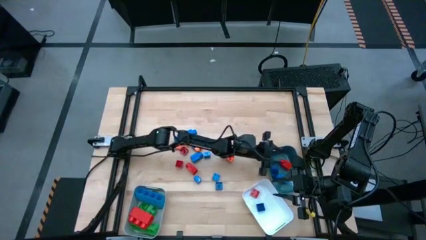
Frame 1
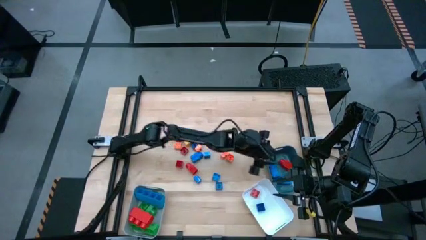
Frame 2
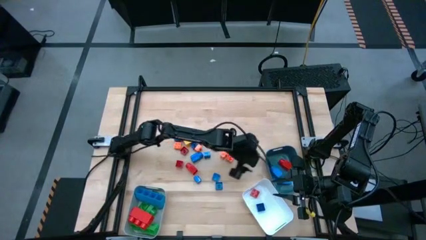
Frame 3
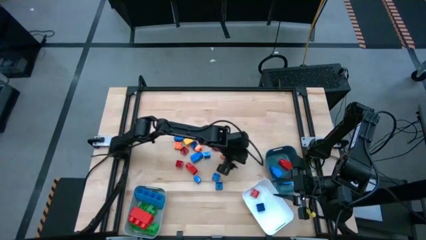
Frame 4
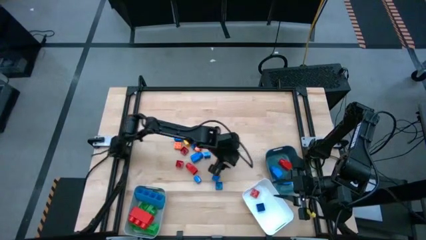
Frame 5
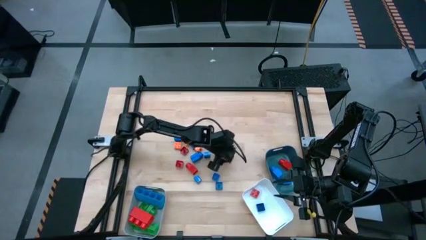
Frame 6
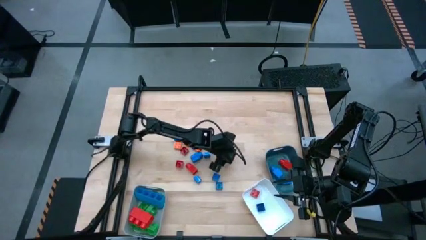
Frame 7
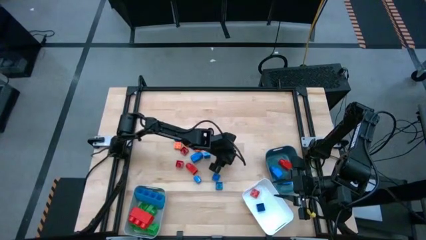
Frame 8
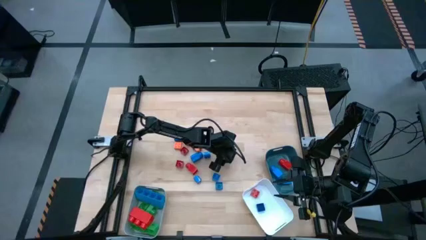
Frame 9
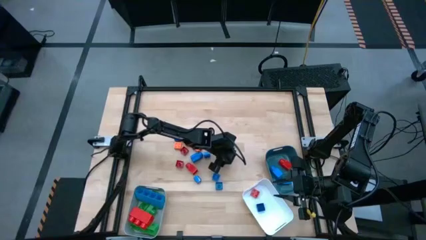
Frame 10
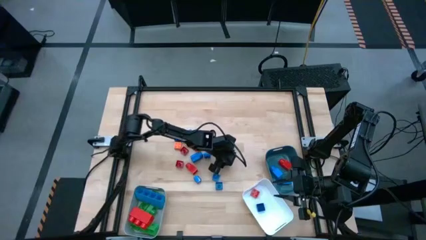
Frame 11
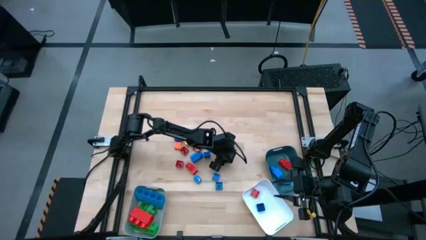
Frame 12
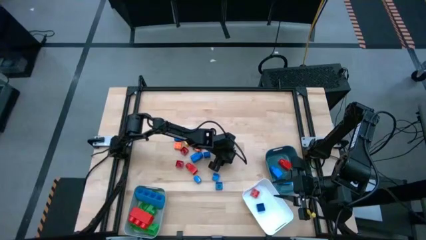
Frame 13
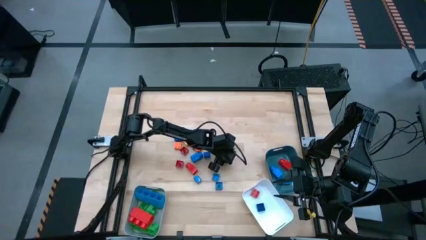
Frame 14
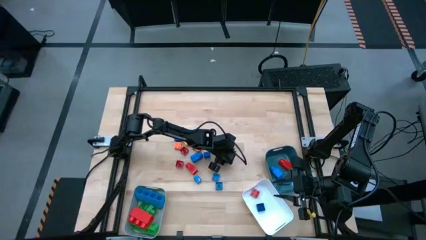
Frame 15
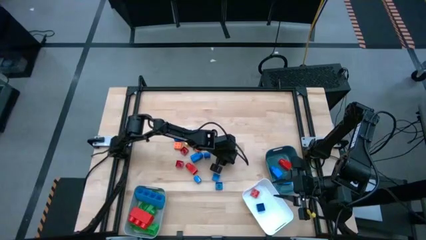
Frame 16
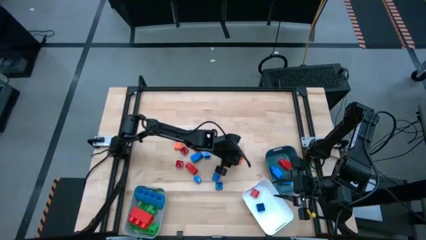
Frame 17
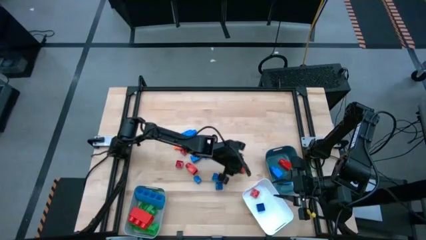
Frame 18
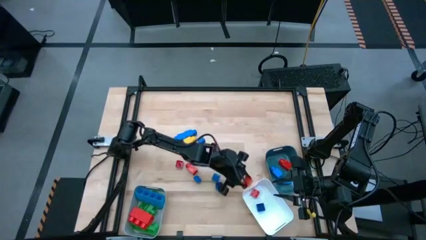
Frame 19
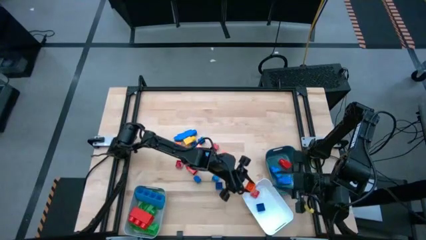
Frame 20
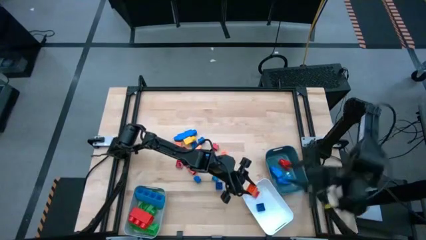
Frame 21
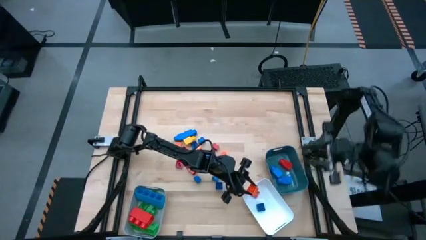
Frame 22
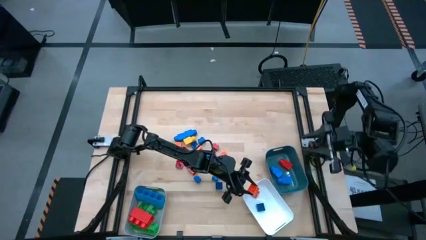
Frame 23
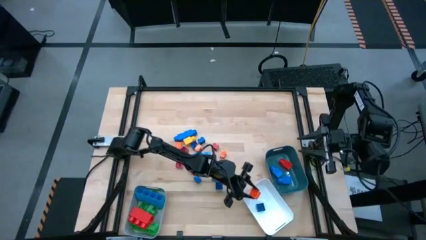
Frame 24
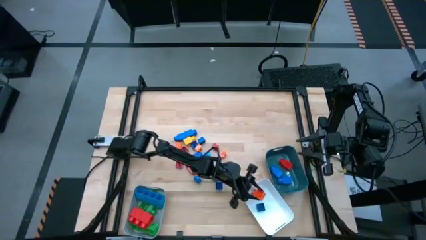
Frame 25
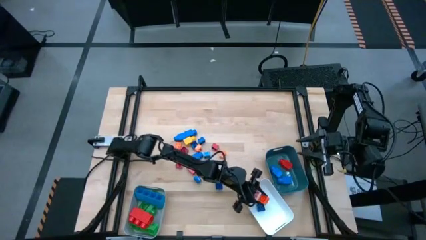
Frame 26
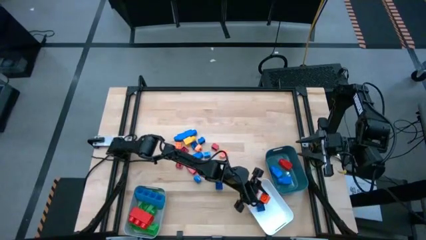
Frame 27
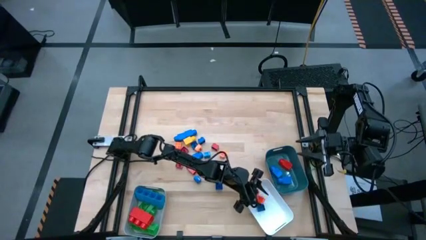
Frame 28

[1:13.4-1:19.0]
Task: Sort blocks by size
Put the small square orange game piece into the white bin

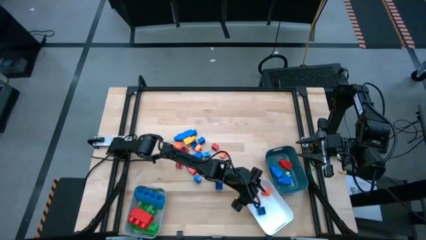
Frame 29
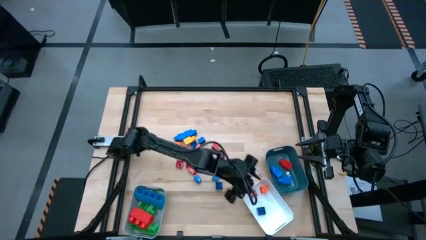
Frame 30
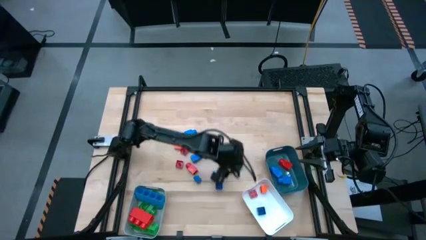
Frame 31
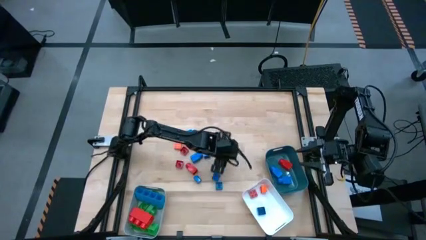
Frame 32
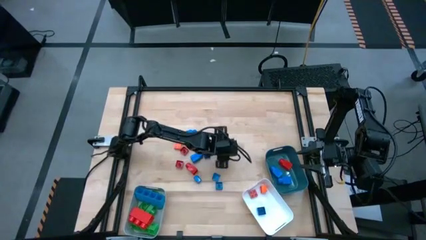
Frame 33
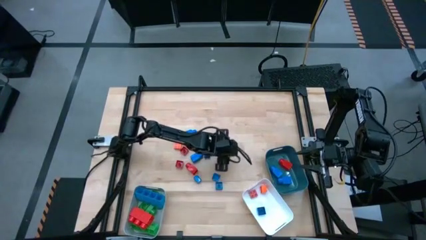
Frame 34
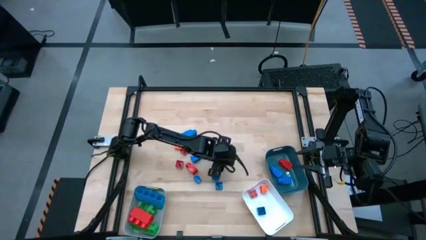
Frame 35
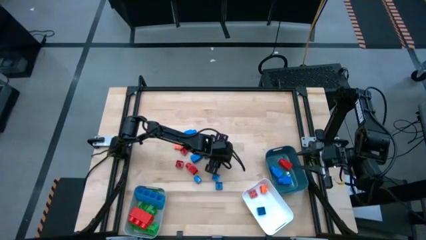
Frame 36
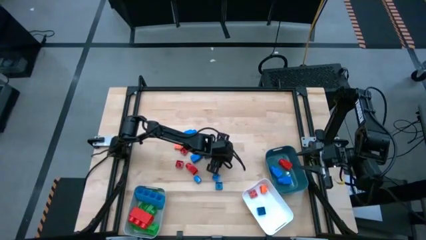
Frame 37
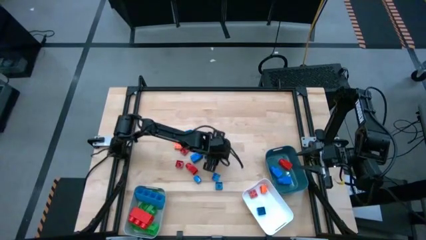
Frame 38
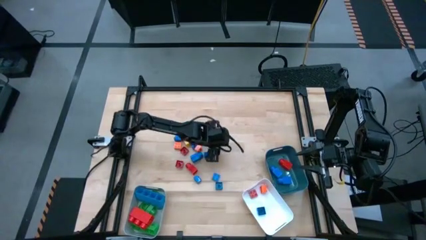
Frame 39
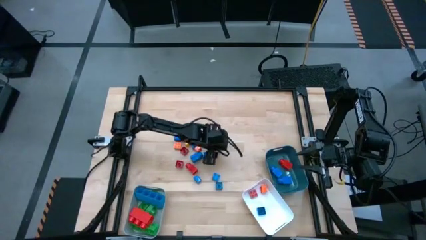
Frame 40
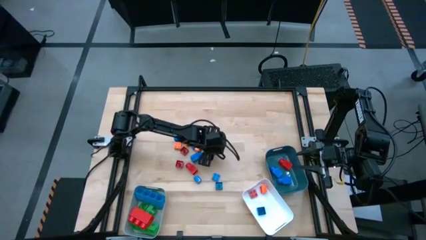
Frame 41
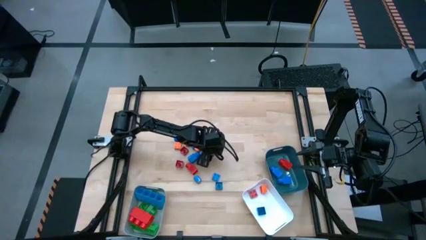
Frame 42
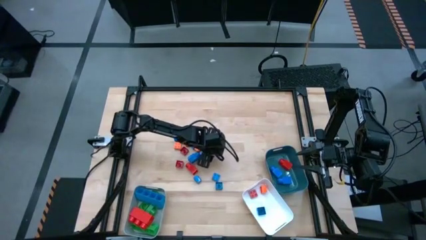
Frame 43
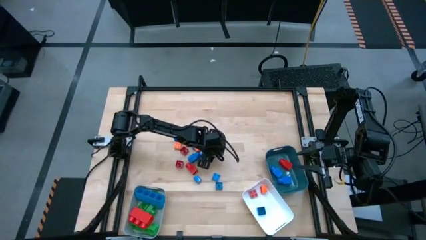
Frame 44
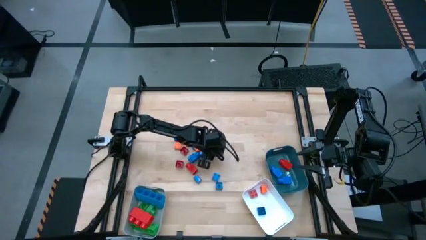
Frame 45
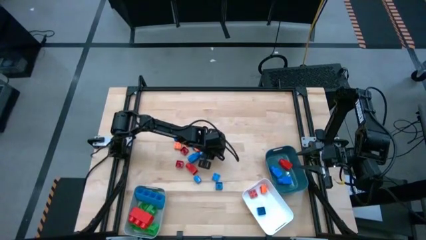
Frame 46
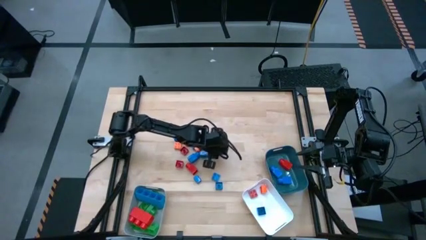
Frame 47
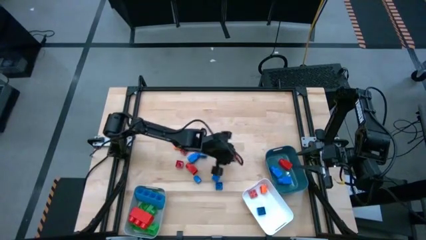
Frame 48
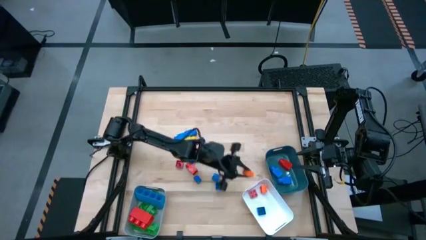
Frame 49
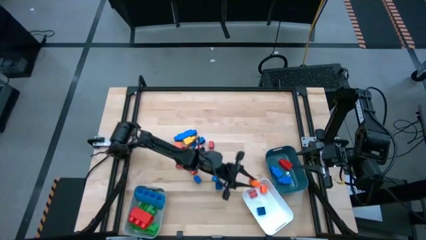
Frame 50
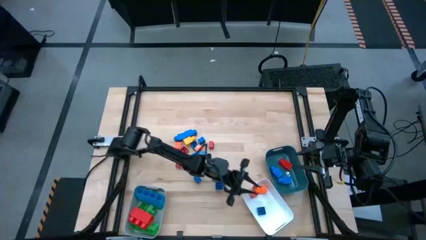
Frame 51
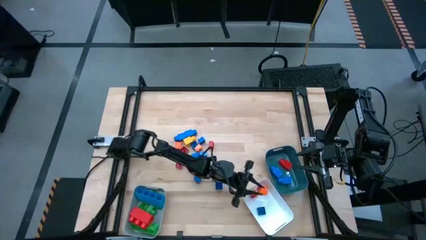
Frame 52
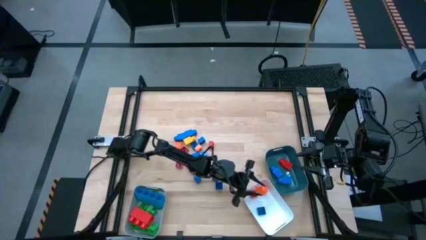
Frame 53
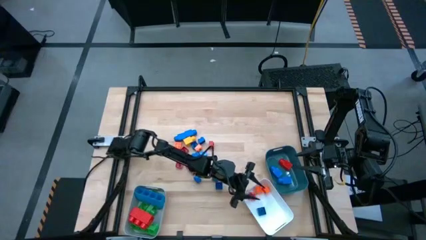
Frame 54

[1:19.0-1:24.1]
Put the small square orange game piece into the white bin

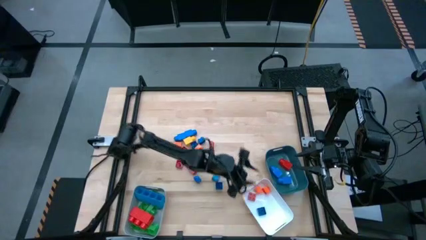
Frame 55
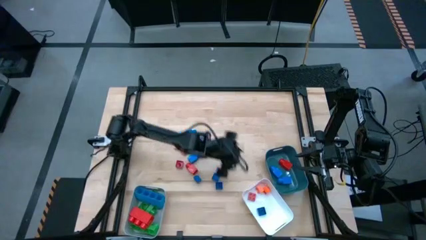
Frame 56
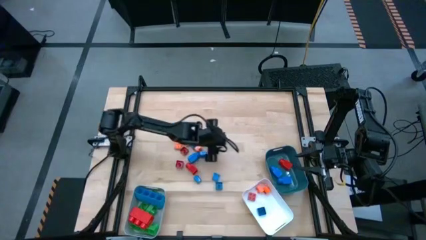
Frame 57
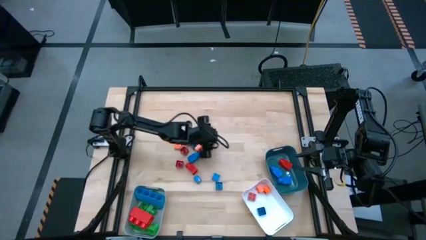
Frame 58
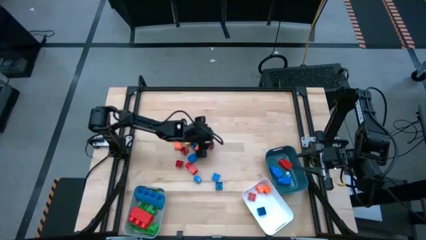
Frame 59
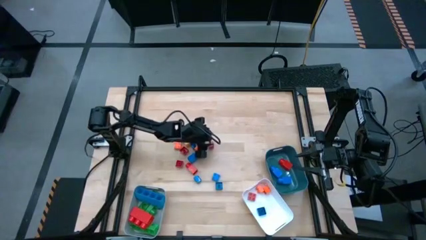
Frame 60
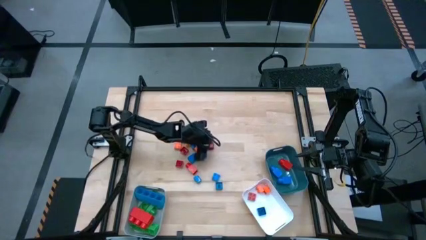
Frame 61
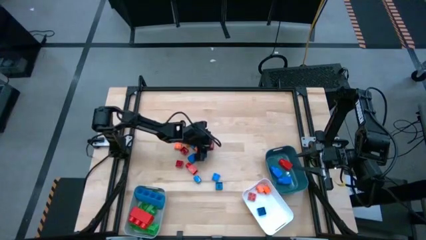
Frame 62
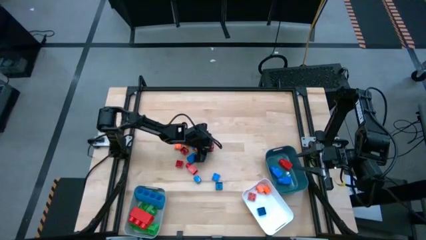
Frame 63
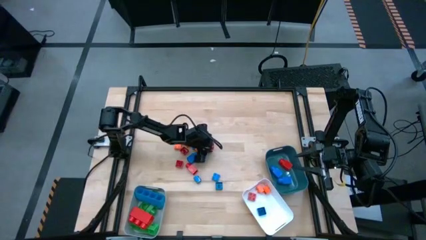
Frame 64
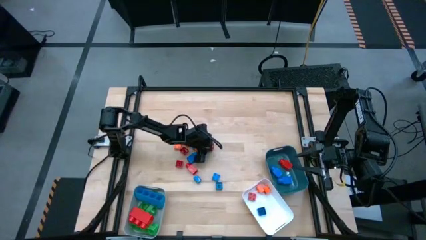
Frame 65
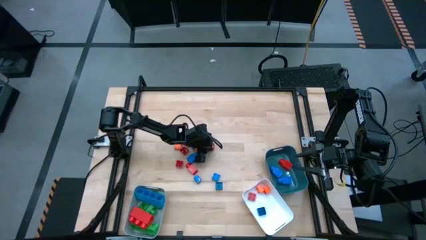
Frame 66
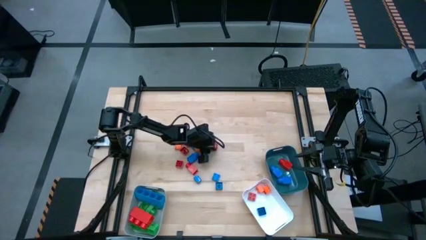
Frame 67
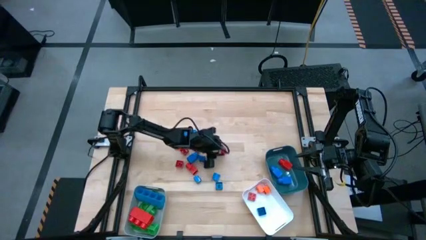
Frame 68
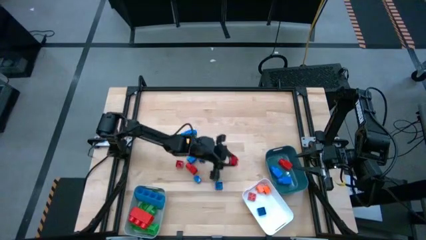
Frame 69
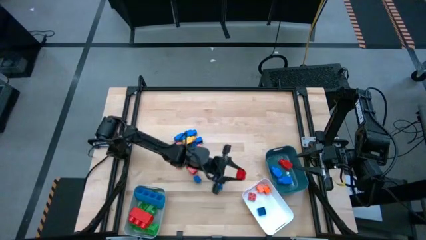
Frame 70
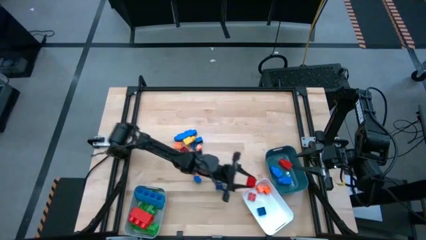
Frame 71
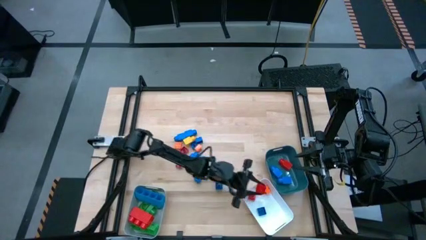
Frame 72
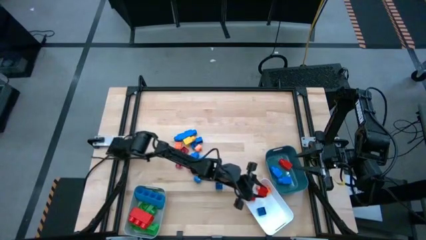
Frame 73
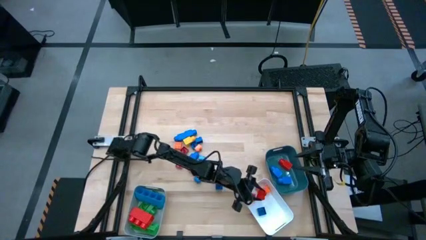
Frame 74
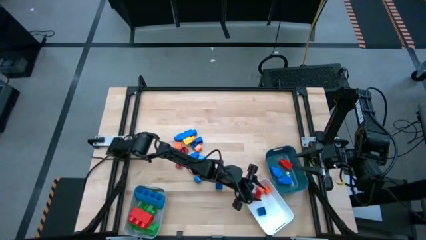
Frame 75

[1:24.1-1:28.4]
Put the small square red game piece into the white bin

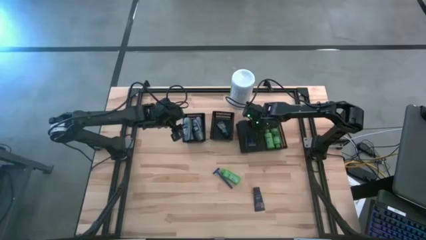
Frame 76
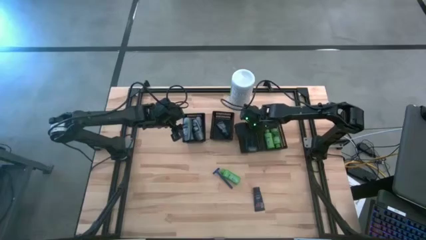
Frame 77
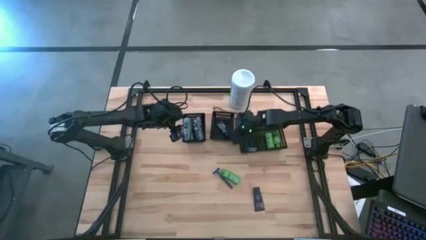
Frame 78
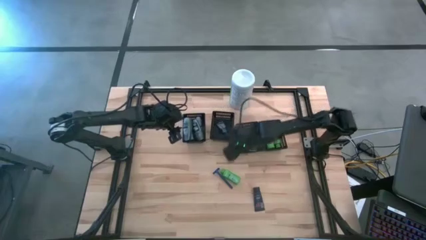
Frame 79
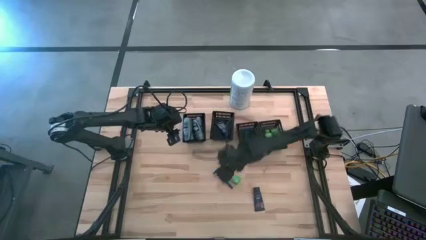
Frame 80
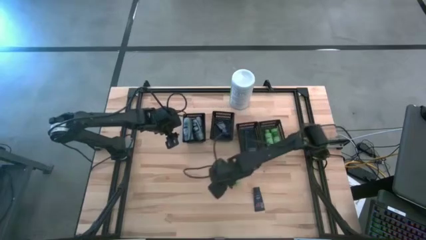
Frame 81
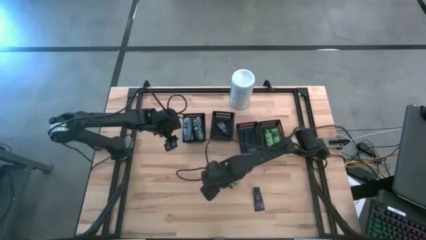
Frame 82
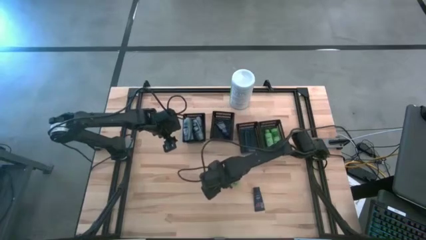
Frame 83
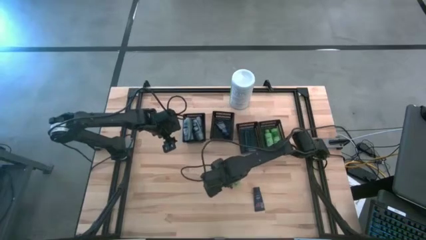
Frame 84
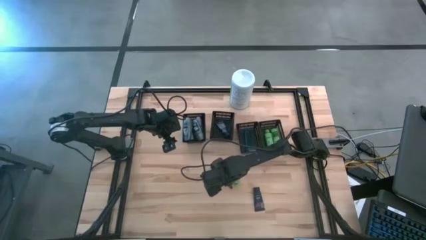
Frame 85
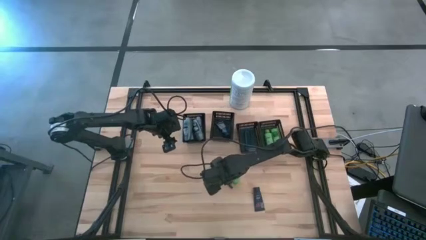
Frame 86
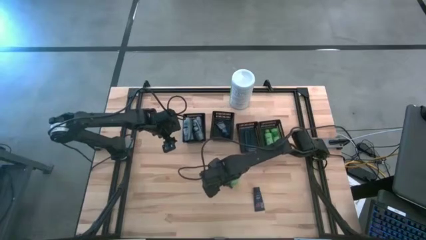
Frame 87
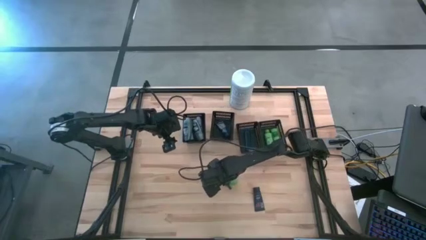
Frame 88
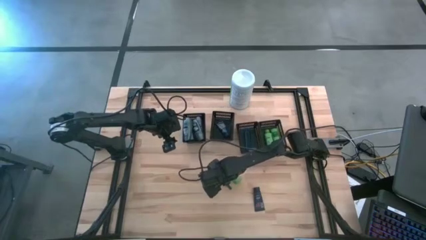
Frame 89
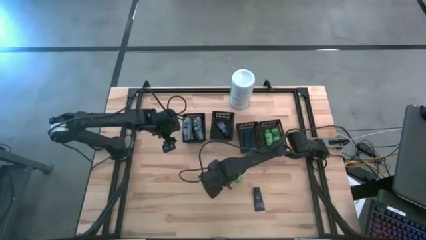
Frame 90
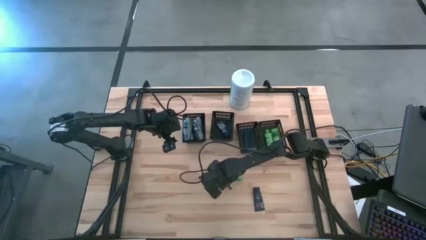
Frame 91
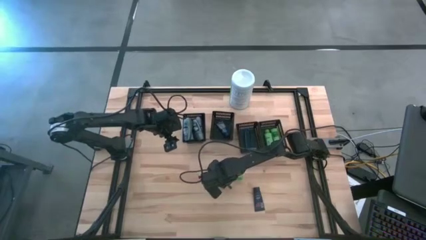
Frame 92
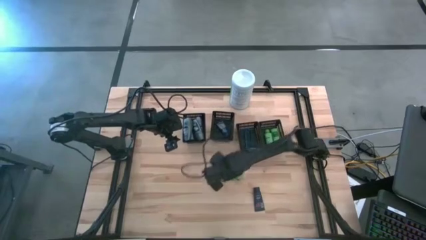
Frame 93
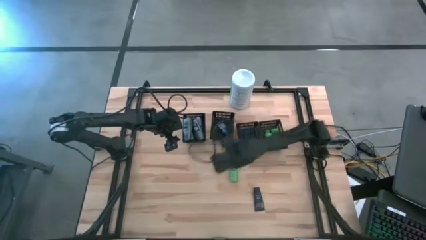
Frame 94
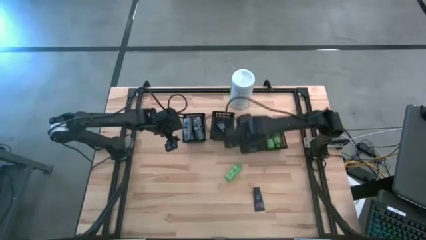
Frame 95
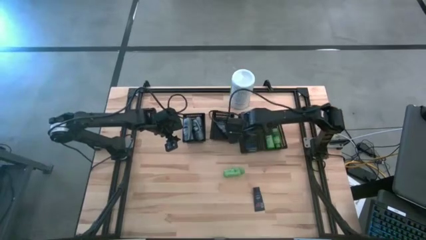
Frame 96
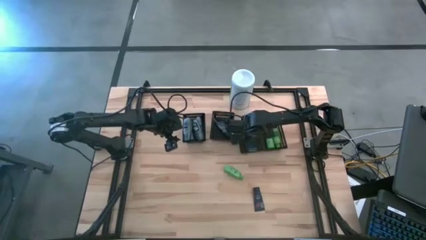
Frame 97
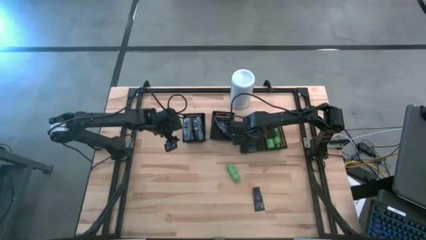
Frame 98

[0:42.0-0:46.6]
Task: Pick & Place Travel size toiletries
Put the blue razor into the middle right black bin
